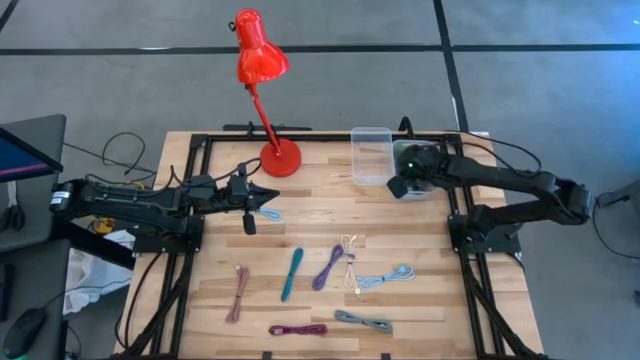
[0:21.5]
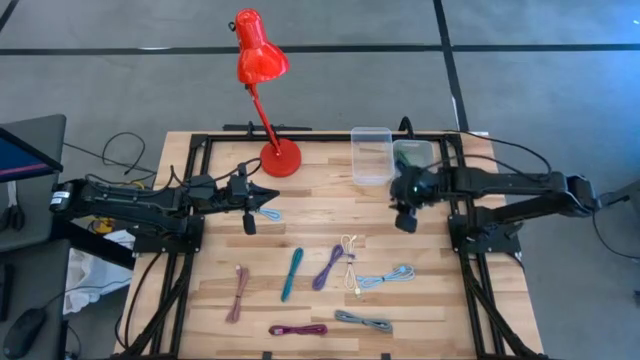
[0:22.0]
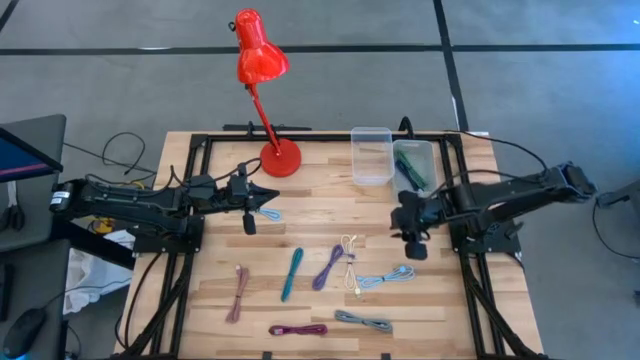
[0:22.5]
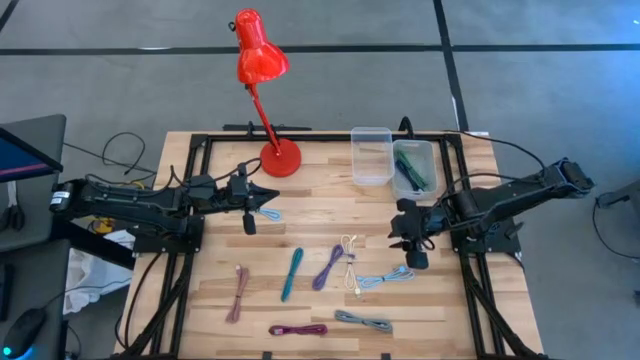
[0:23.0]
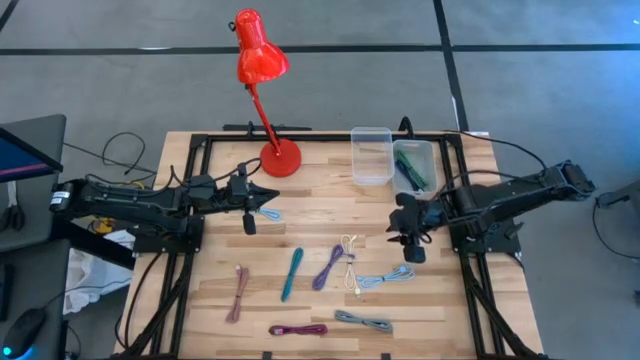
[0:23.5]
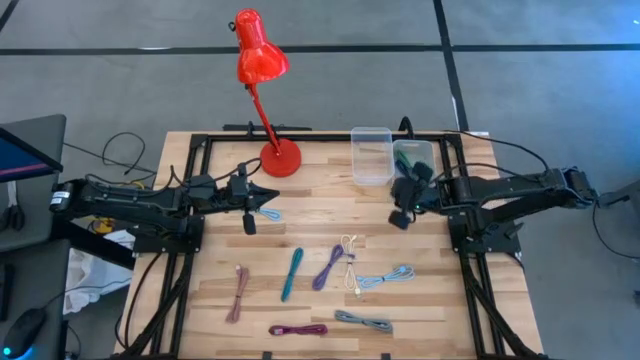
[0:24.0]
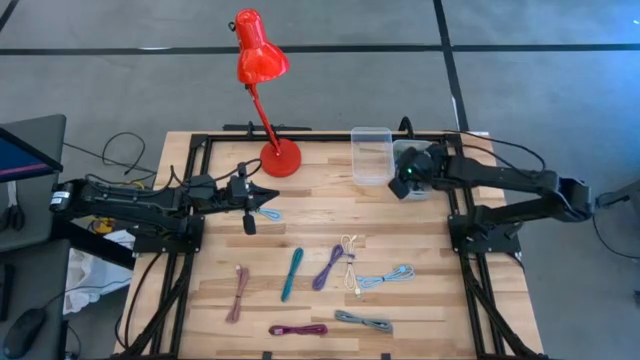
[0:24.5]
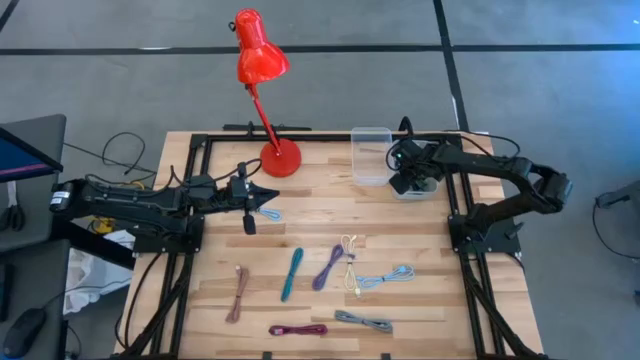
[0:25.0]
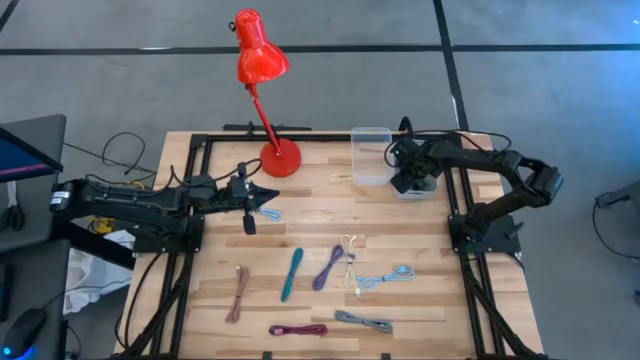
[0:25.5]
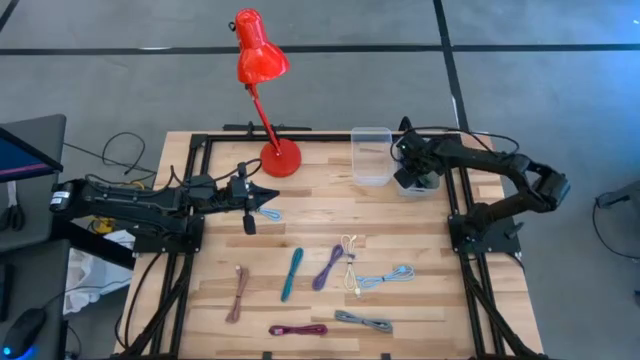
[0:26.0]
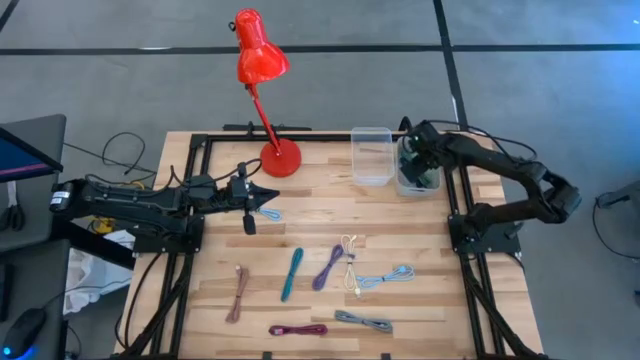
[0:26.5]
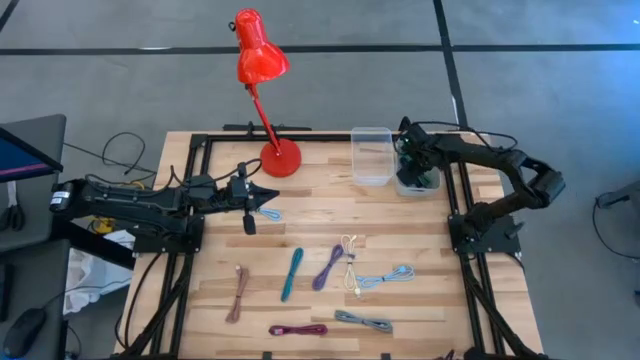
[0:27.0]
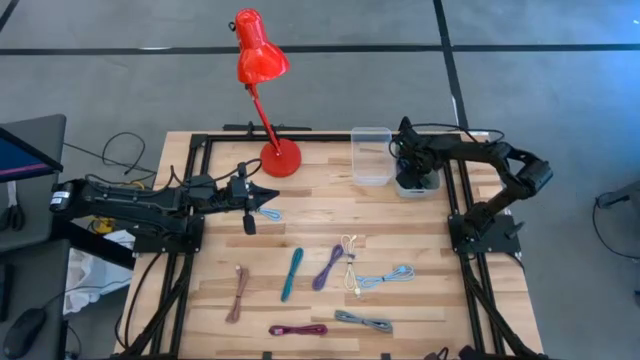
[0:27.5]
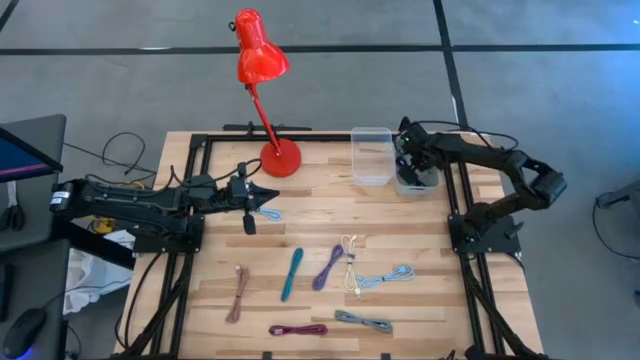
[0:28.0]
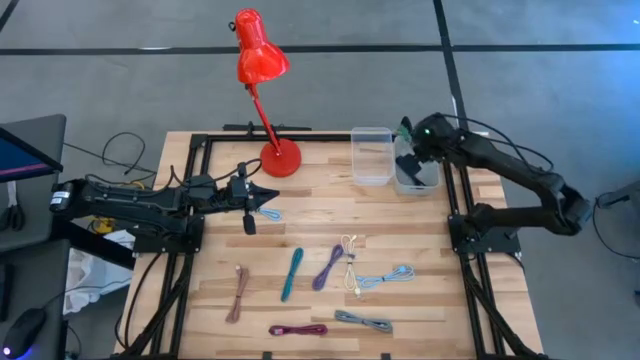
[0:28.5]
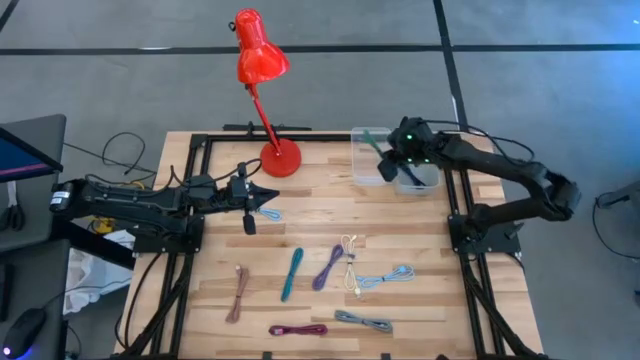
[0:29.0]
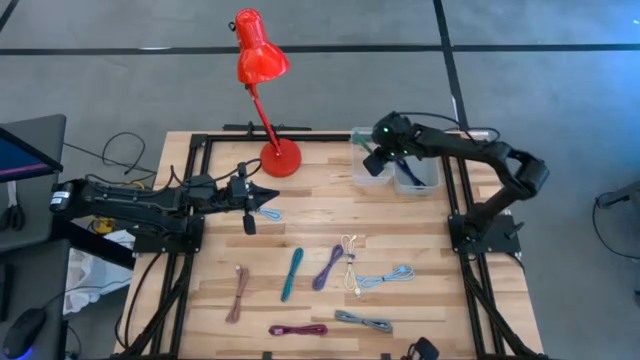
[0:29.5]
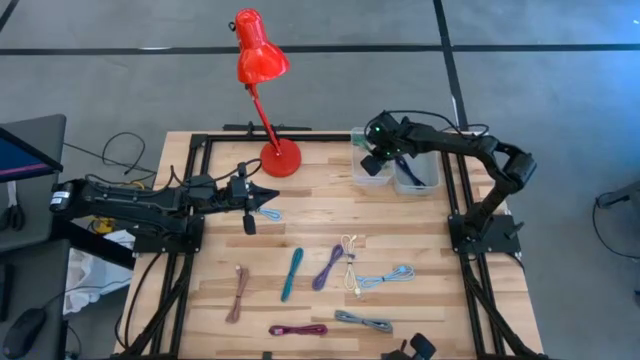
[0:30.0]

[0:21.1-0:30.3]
Task: Pick & Place USB Port
Put the green charger cable into the transparent bin

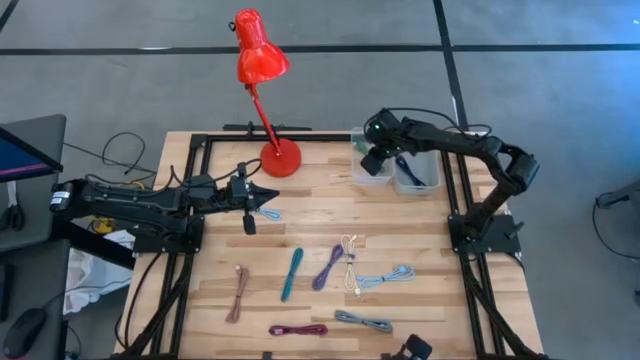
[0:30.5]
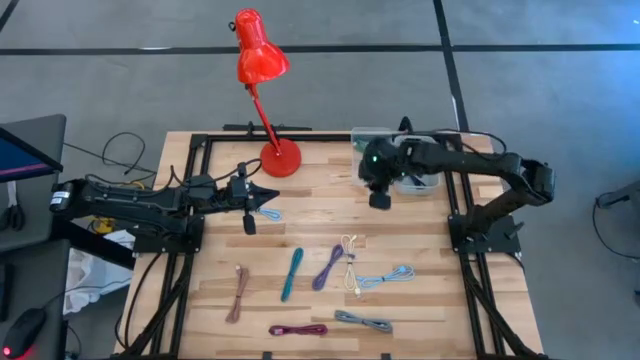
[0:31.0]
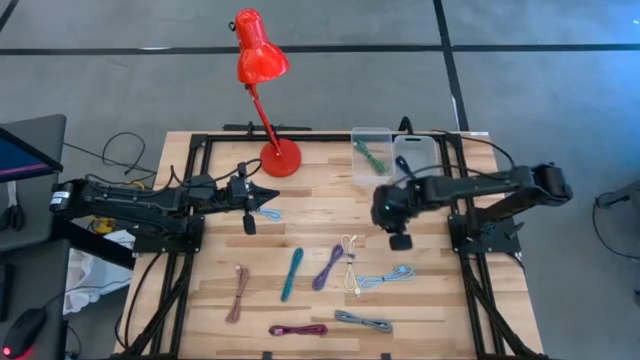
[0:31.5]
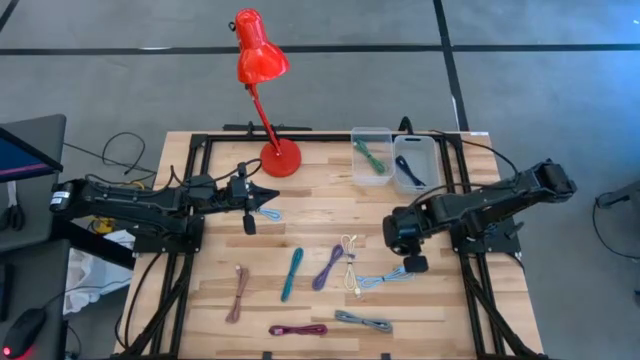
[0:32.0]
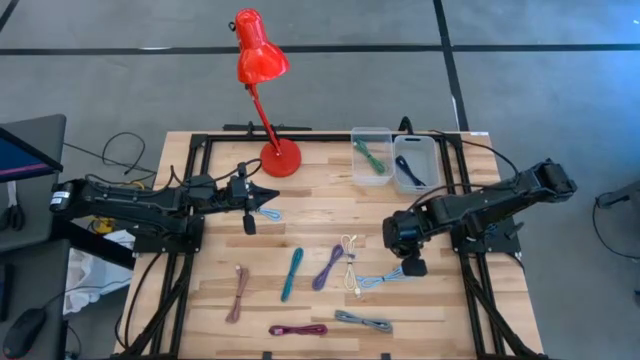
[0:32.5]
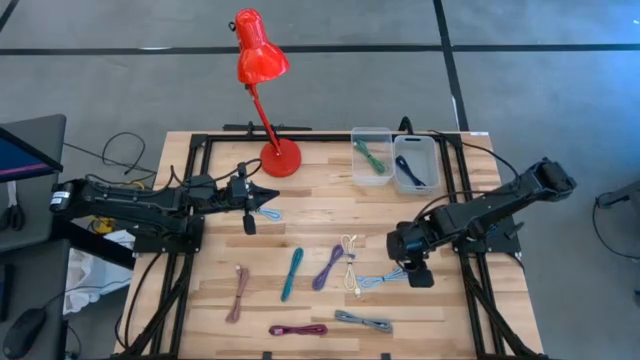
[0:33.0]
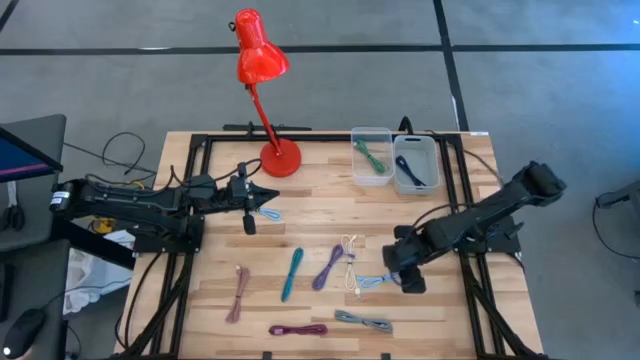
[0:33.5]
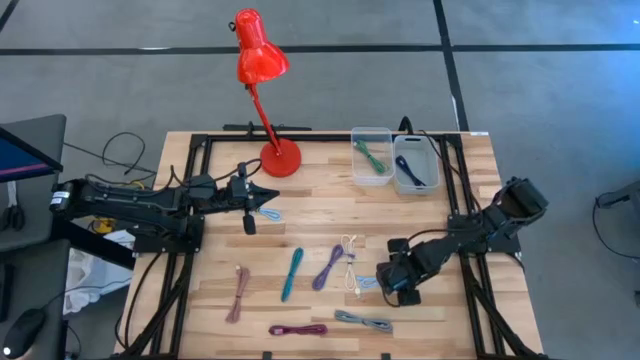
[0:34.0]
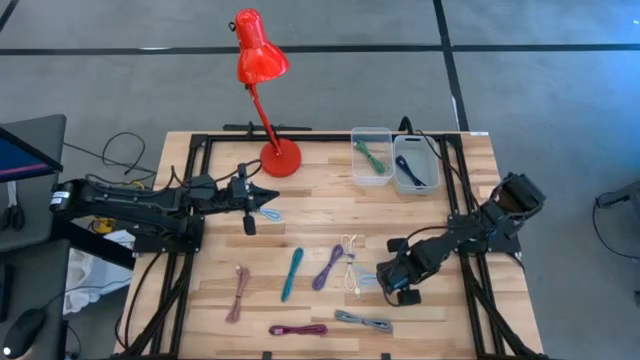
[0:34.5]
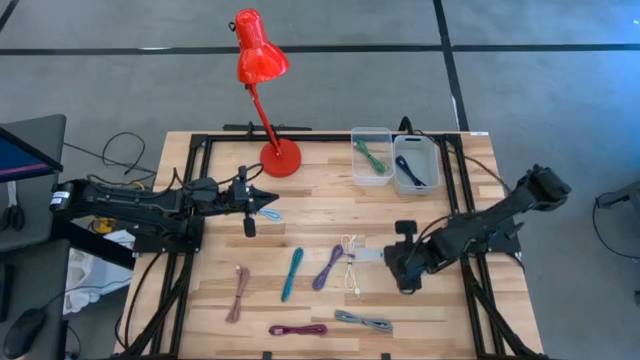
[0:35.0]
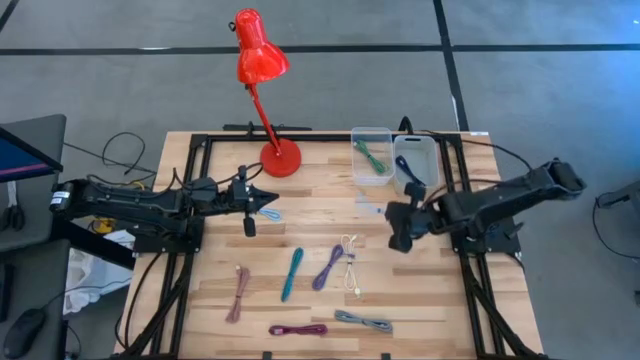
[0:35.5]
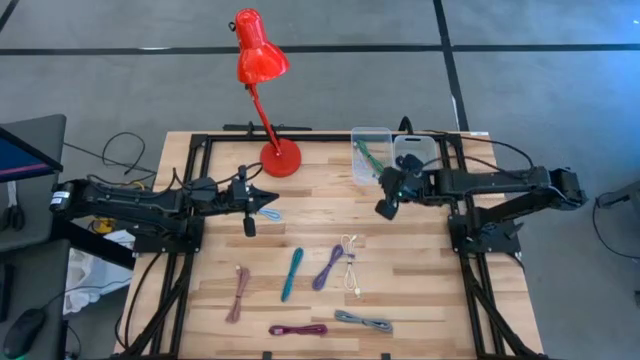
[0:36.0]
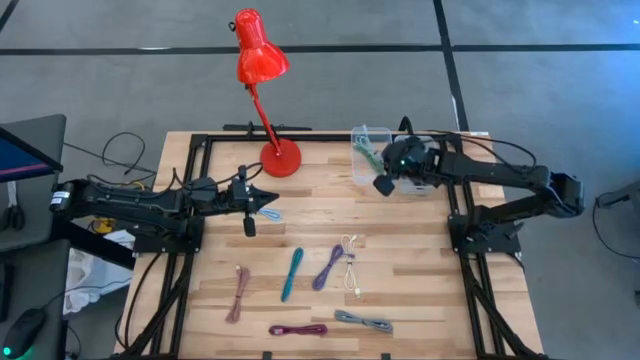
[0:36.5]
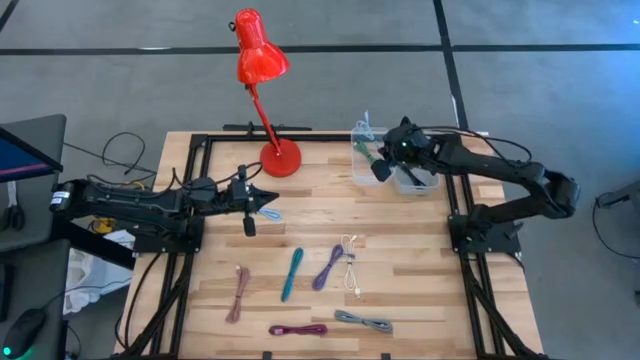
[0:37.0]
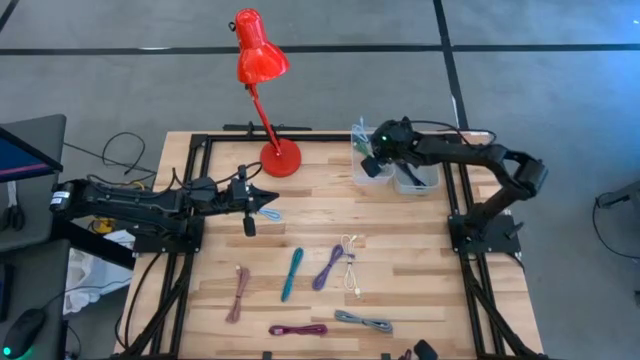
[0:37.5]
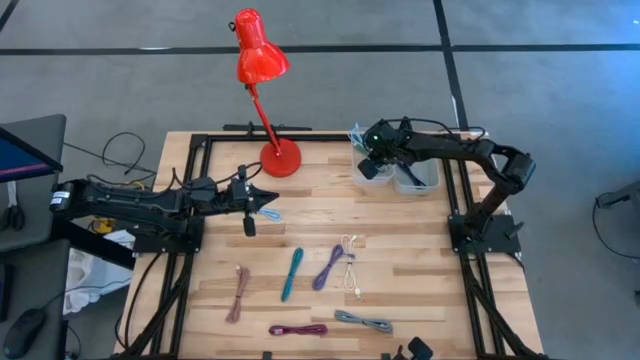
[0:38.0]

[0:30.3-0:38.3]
Put the bottom light blue charger cable into the transparent bin

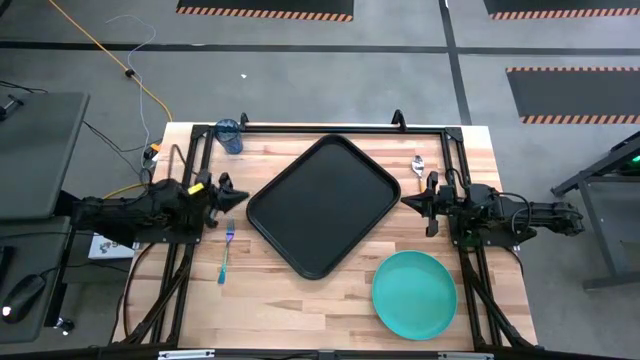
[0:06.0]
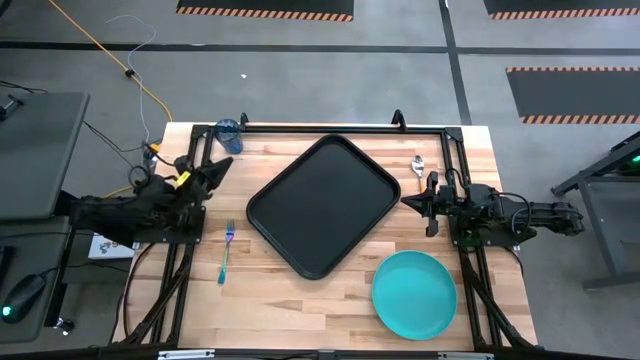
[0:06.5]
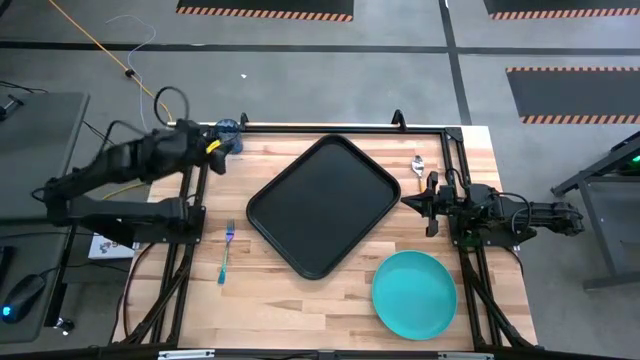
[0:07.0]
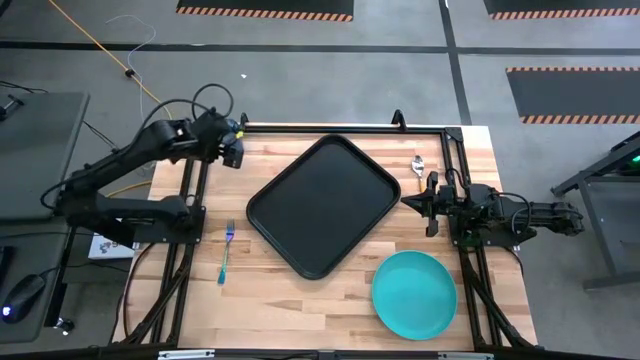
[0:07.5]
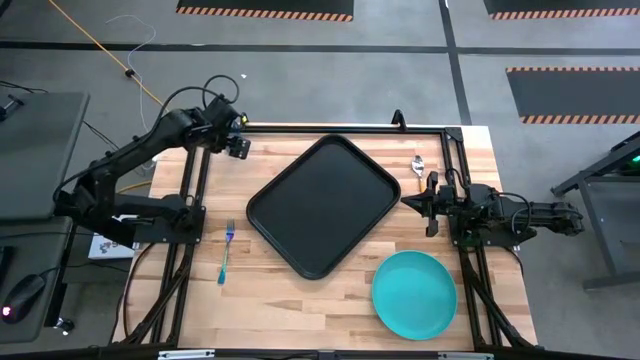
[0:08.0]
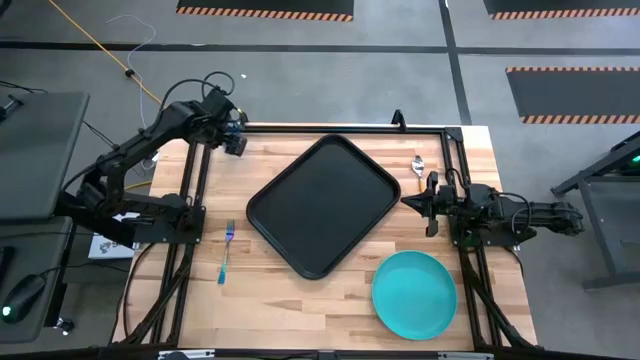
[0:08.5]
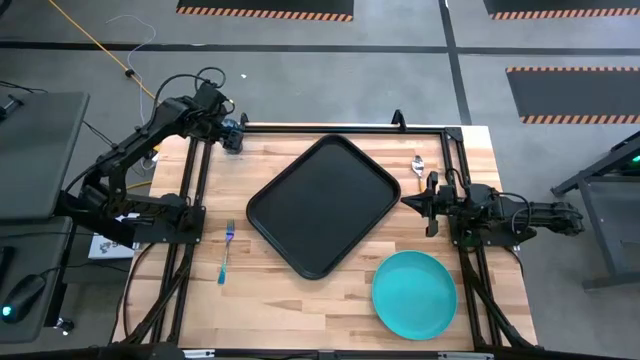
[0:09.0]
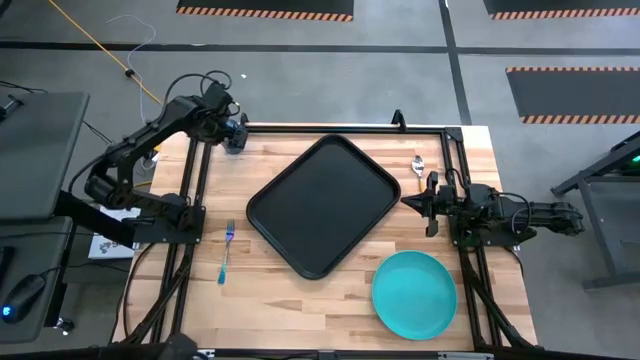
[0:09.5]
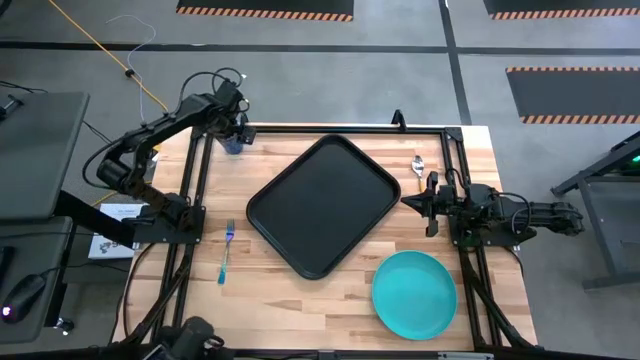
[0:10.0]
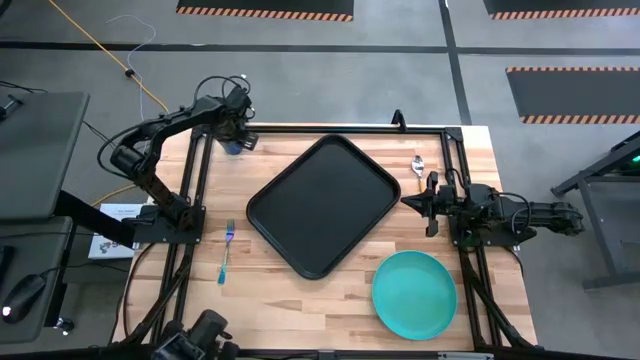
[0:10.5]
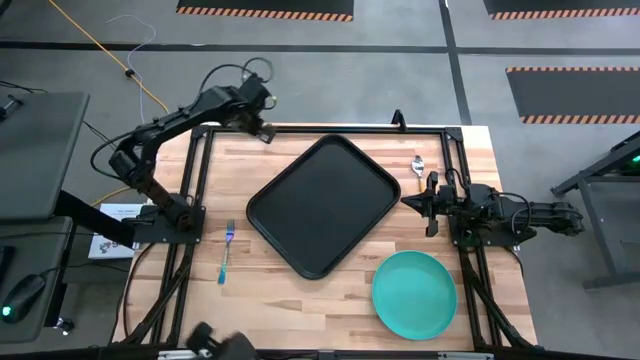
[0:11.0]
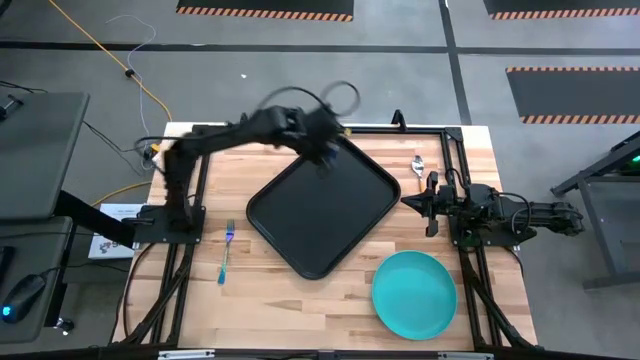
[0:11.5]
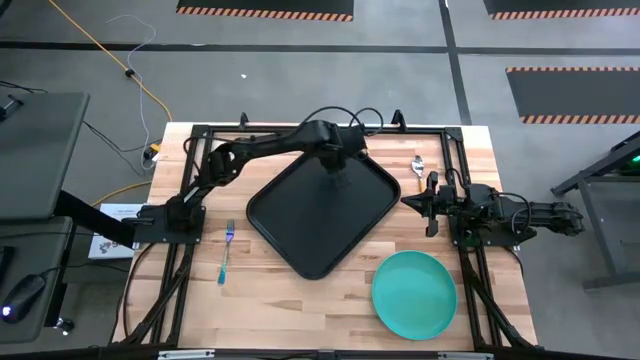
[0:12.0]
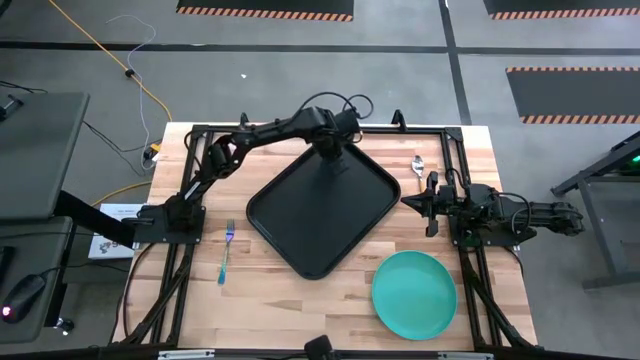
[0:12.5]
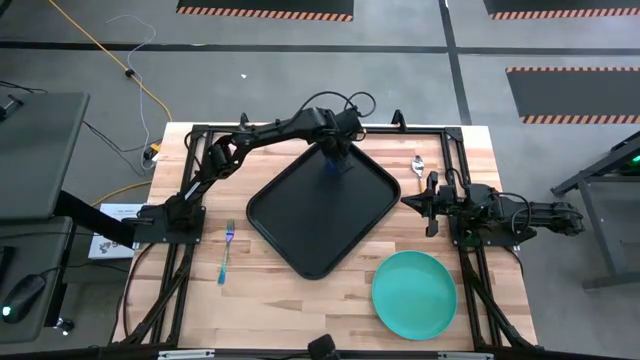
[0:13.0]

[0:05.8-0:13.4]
Task: Pick and place plate/cup/fork/spoon on tray
Put the blue cup on the black tray
